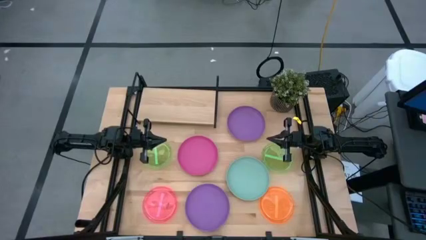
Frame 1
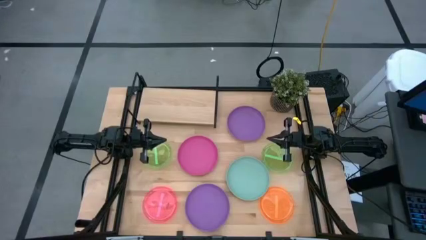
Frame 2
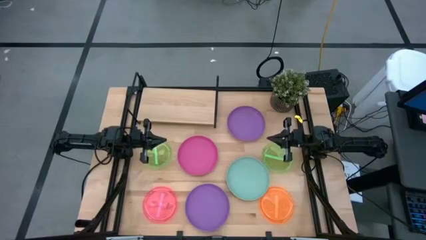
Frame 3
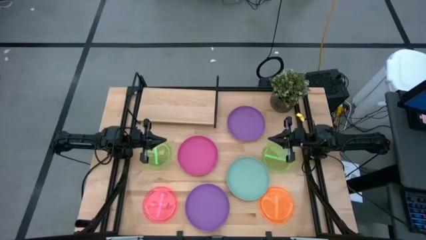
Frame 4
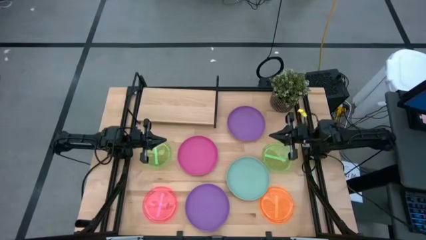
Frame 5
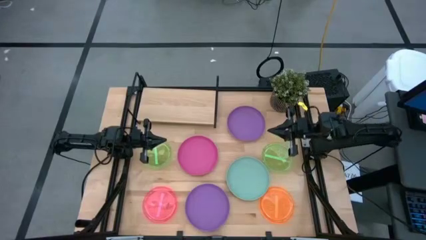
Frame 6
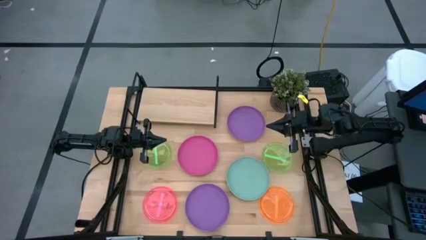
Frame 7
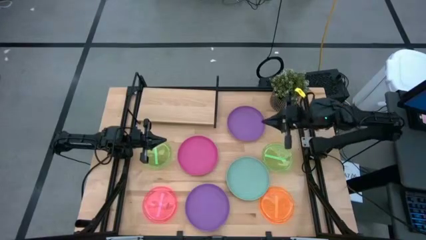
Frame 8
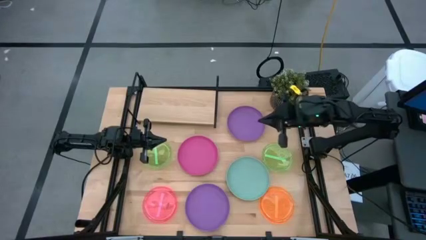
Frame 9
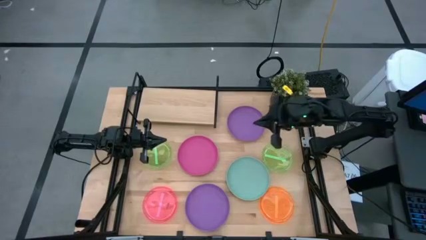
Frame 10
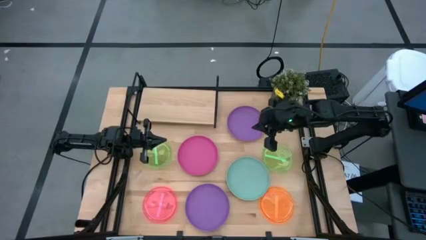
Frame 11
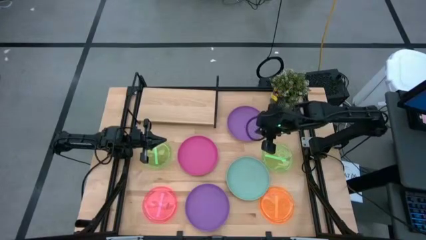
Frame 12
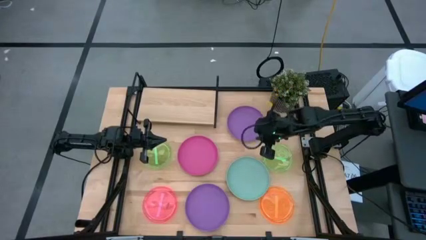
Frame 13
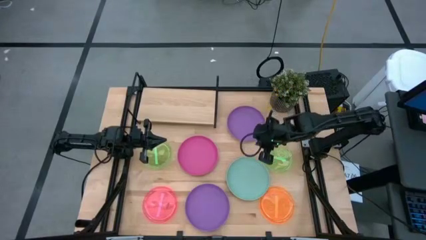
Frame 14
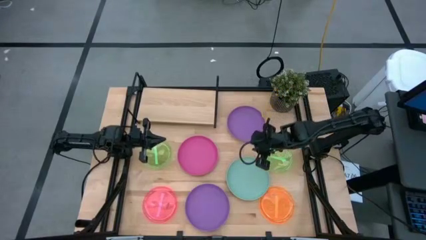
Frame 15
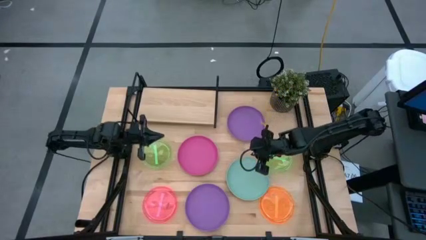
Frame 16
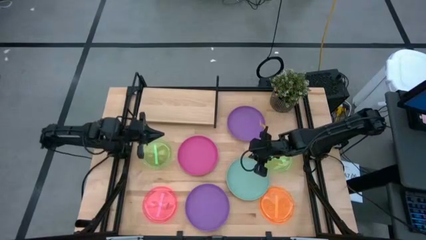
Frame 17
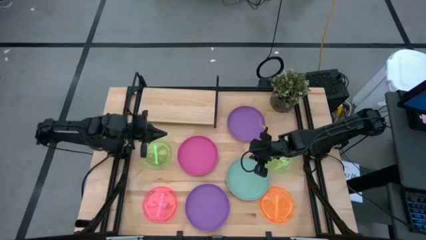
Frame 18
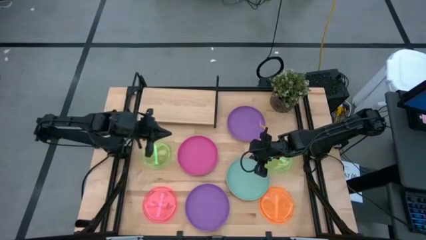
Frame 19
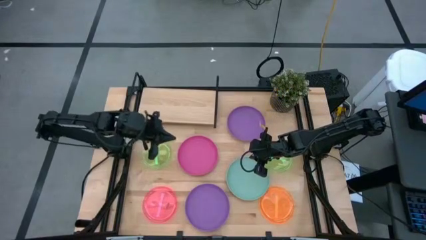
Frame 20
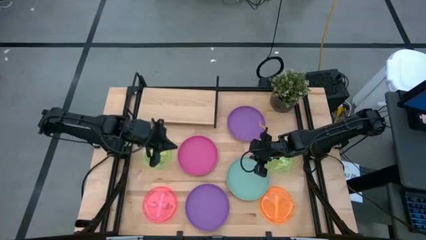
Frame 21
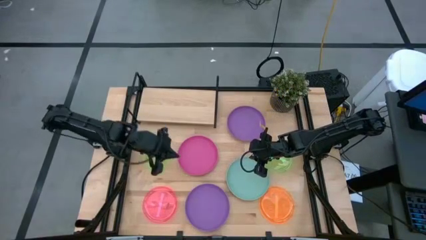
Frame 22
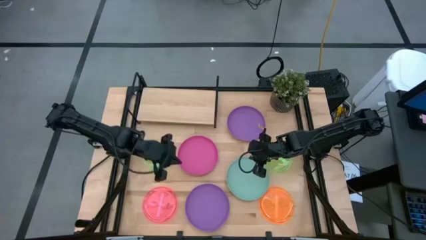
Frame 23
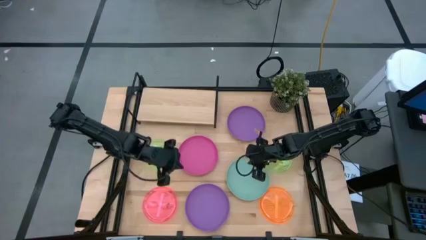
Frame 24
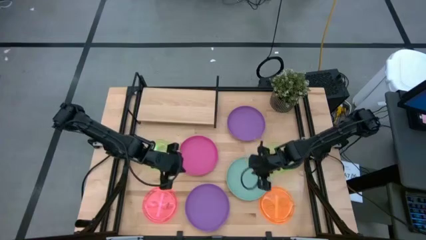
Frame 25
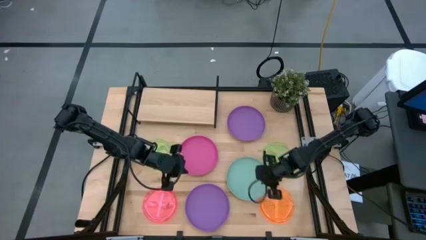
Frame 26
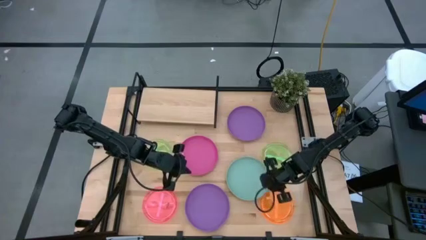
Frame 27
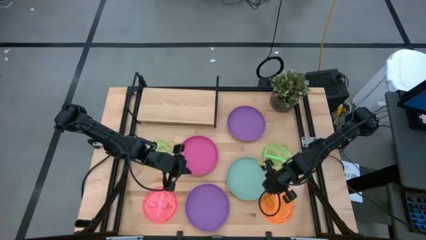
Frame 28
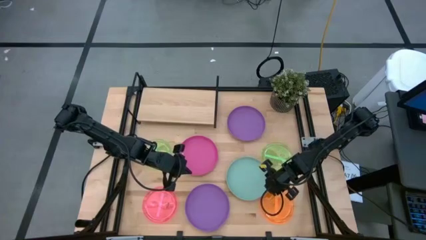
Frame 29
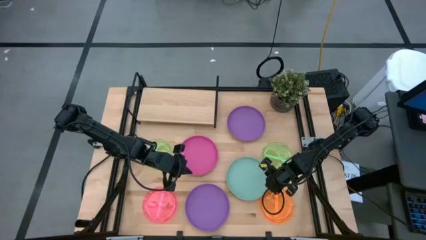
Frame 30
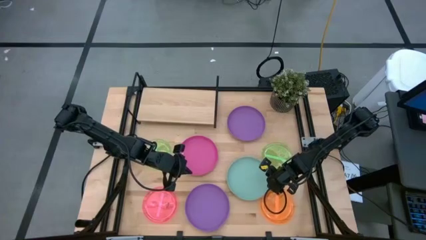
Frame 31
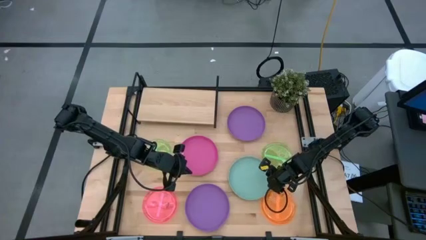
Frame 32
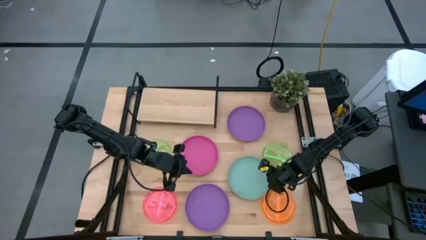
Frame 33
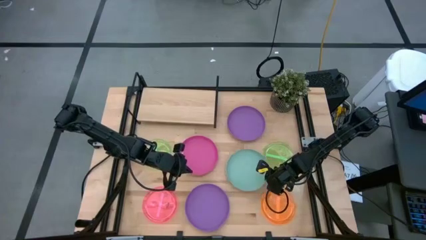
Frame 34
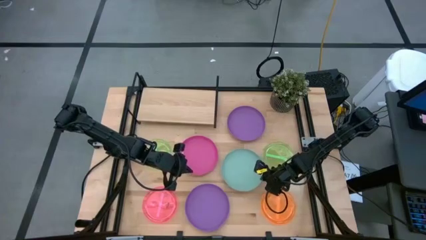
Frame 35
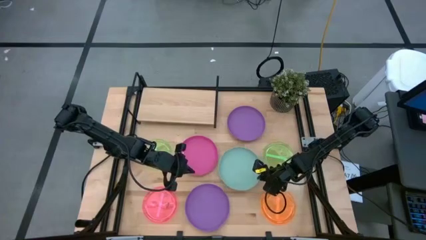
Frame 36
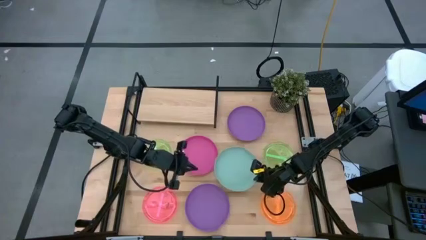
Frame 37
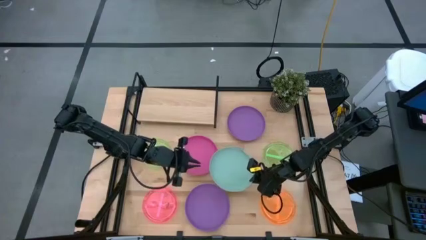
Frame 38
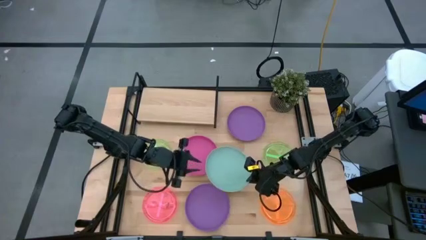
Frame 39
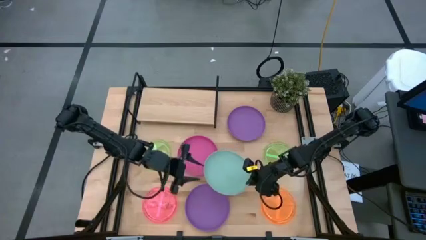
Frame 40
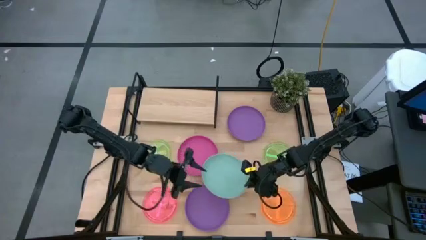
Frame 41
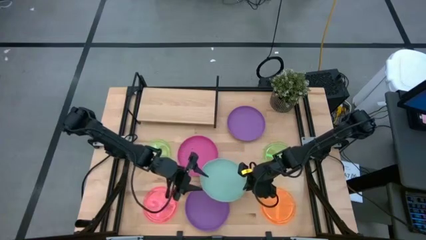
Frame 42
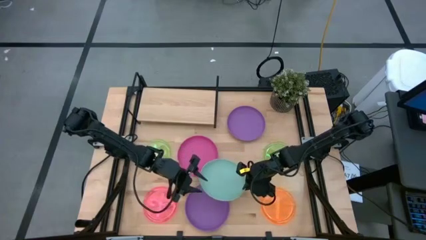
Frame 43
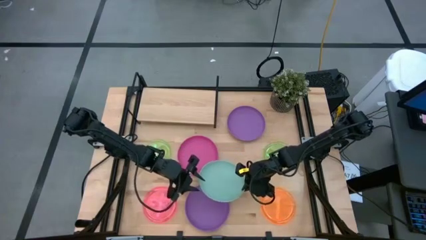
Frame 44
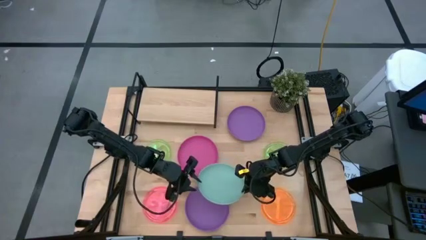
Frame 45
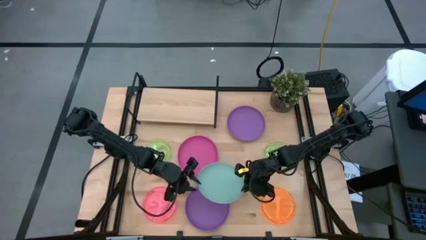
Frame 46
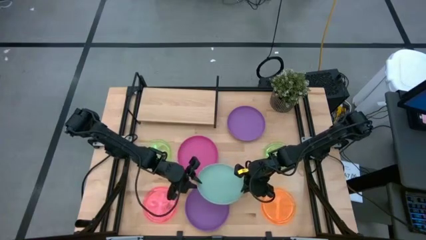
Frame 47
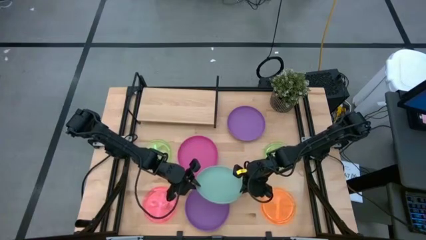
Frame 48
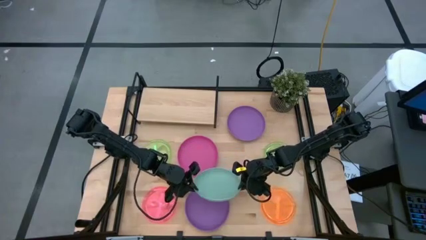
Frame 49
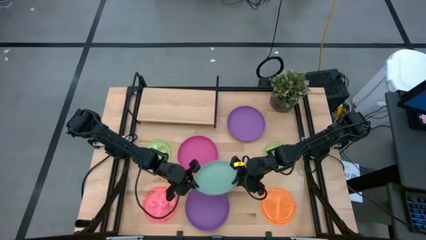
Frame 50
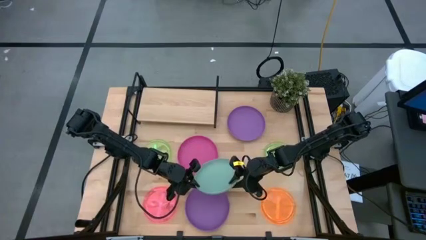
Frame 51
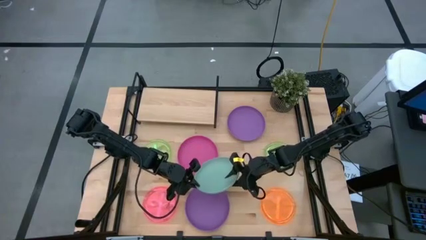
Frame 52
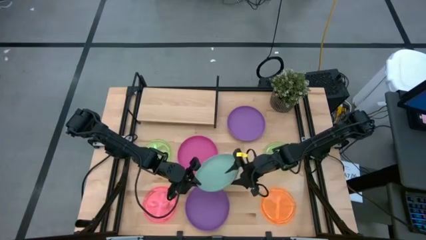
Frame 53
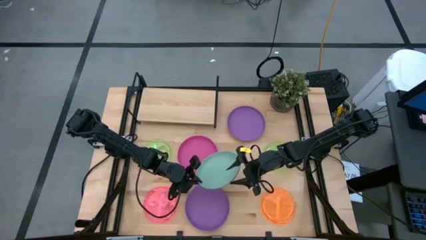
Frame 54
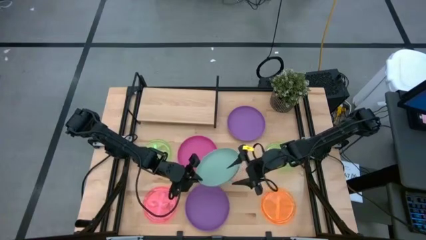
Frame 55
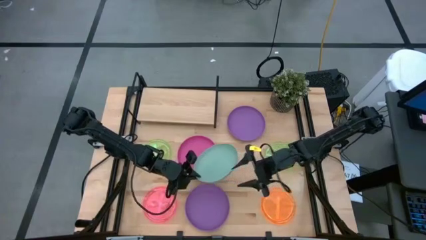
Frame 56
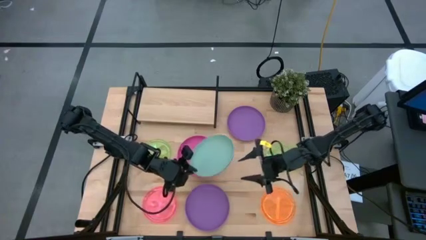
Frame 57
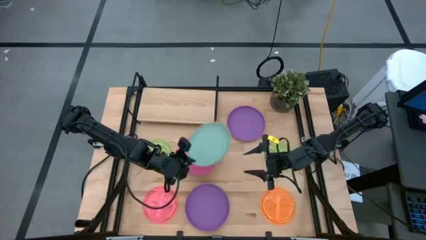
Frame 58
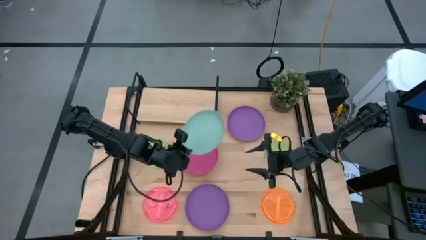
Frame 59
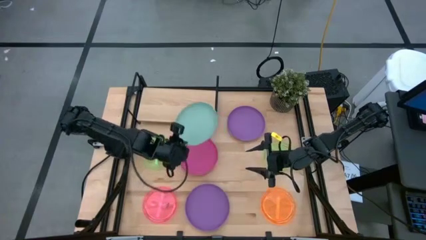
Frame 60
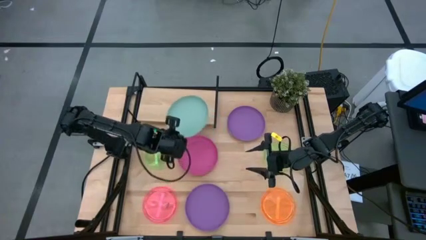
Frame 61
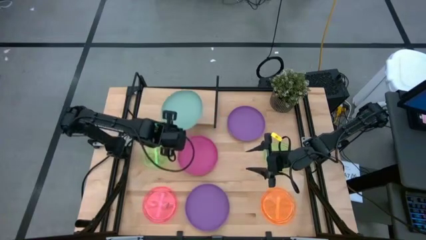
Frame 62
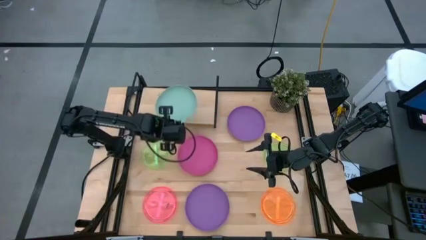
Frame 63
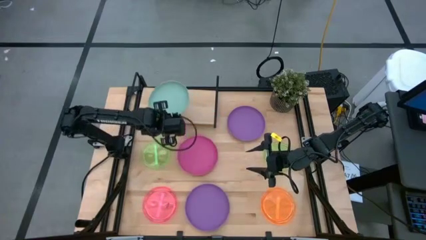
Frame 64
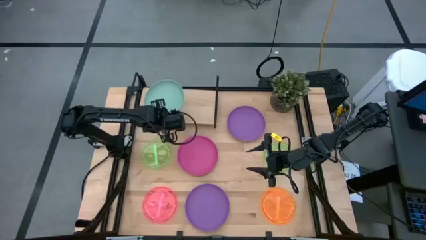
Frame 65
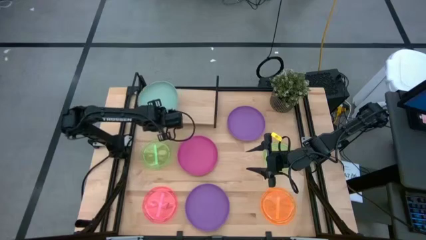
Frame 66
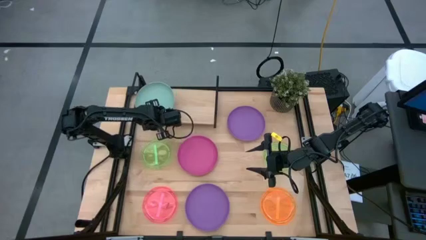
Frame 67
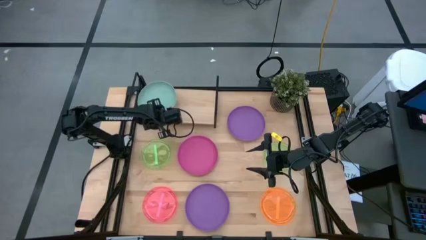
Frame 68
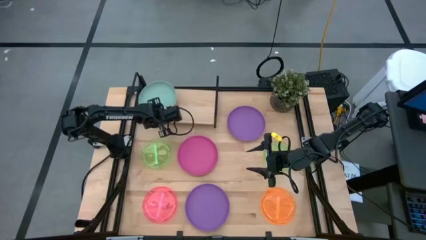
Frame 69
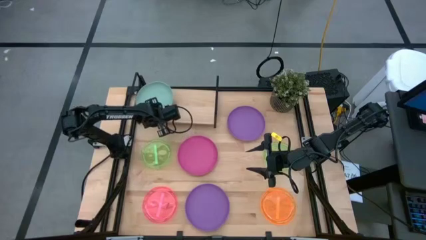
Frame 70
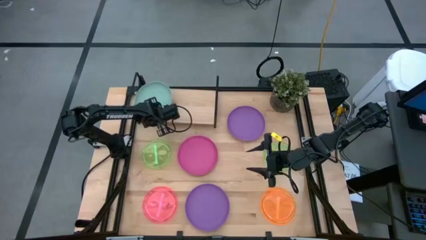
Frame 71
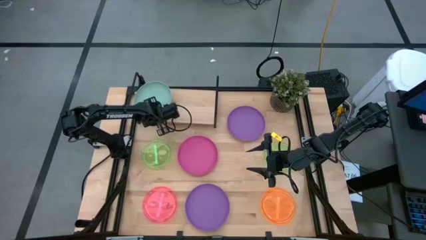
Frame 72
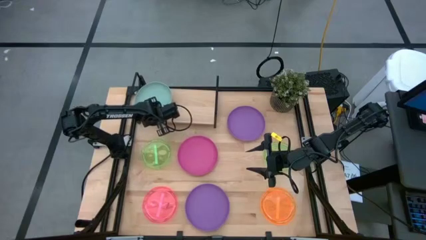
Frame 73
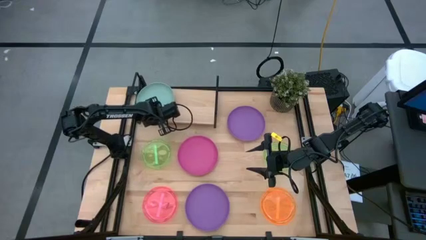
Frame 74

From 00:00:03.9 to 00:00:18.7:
Task: Place and stack plates onto a shelf
Put the blue plate on the shelf

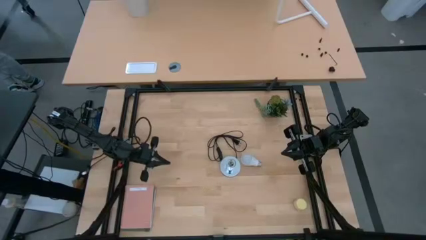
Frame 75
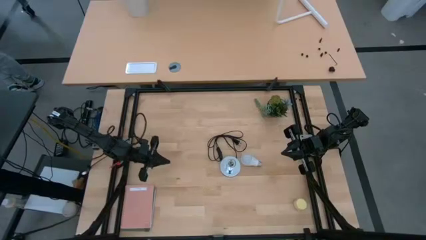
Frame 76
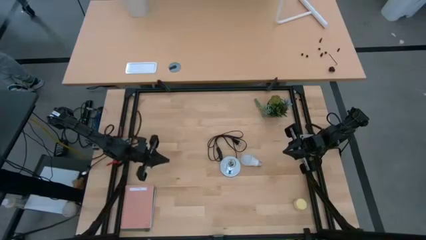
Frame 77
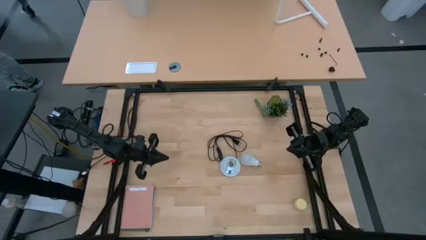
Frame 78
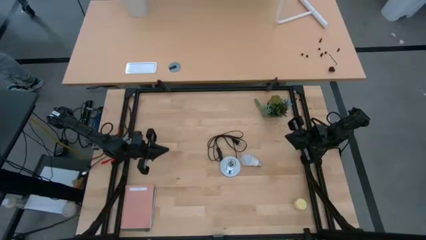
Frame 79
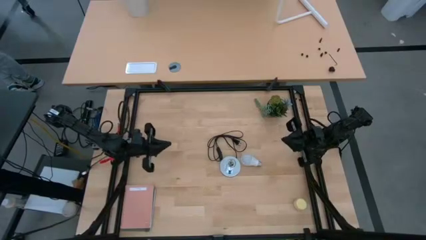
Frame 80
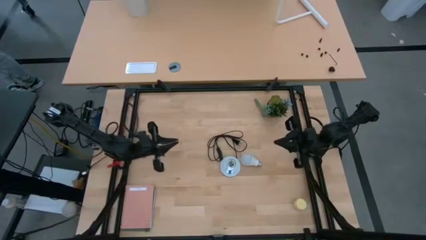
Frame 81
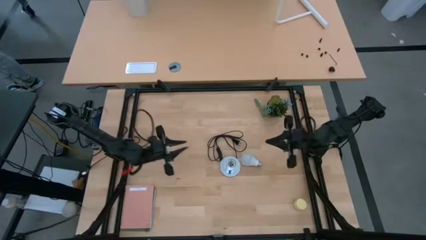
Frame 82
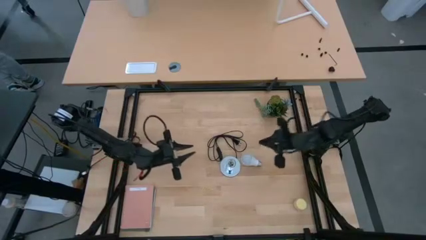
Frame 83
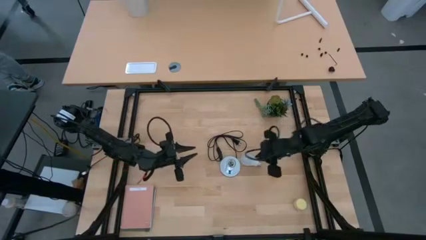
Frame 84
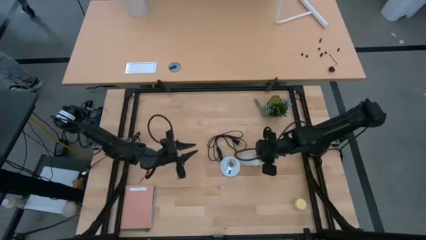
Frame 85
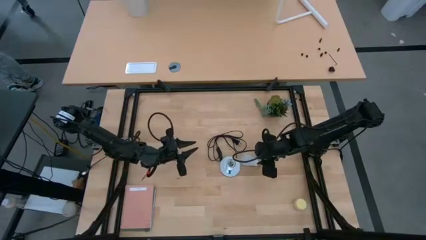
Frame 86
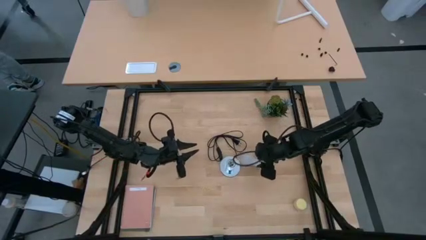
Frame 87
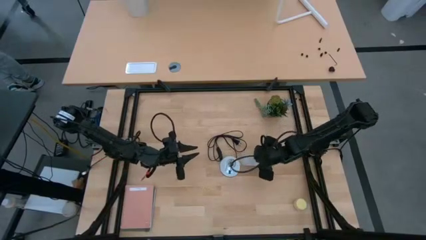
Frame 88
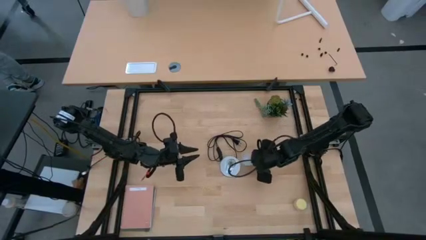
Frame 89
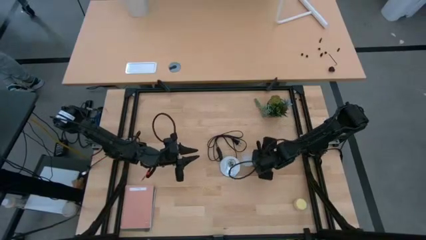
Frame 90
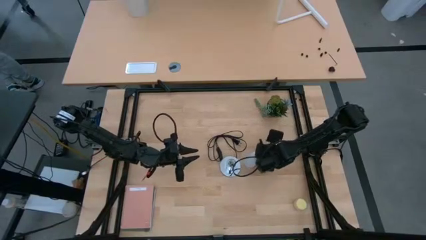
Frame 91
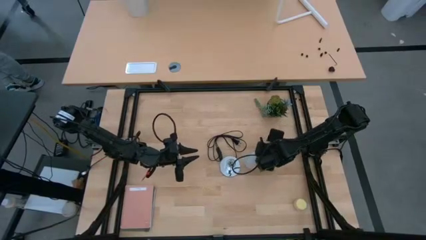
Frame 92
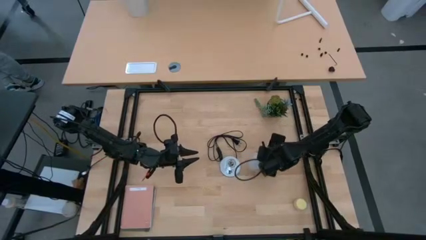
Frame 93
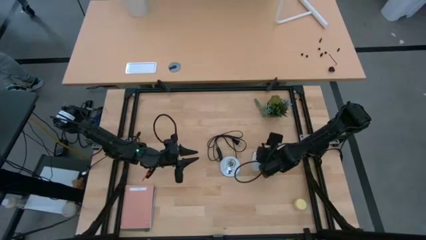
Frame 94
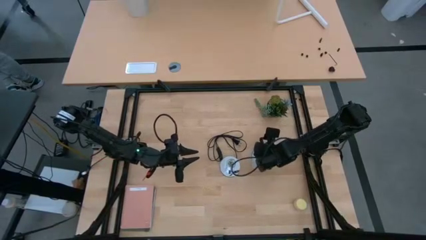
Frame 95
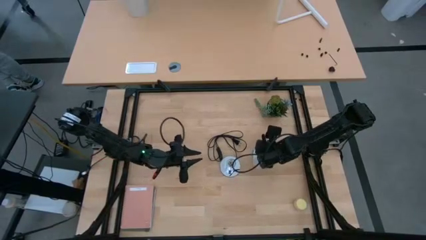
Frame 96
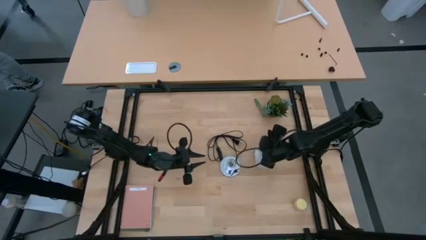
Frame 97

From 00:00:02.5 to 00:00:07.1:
Task: Screw lightbulb
Insert the lightbulb into the lamp
